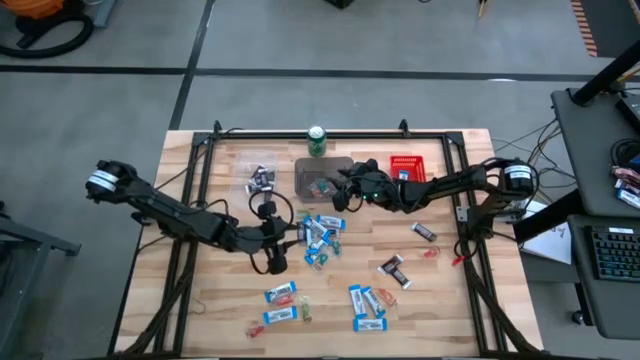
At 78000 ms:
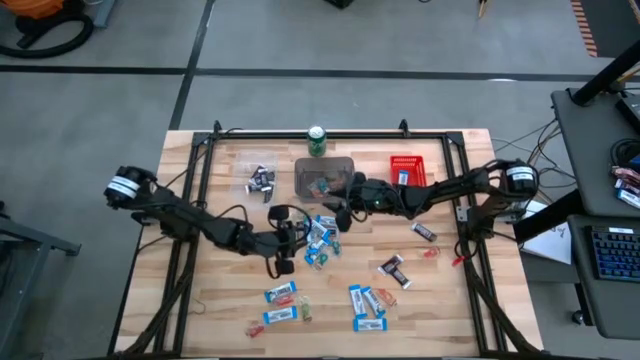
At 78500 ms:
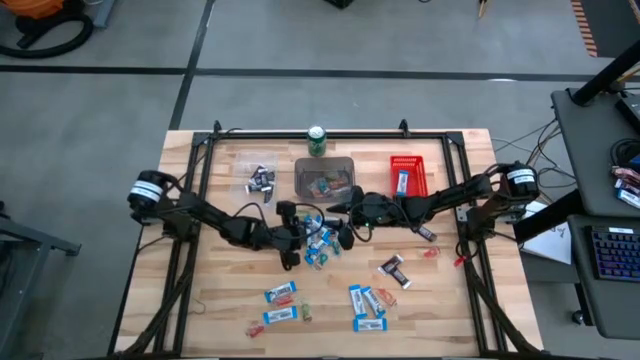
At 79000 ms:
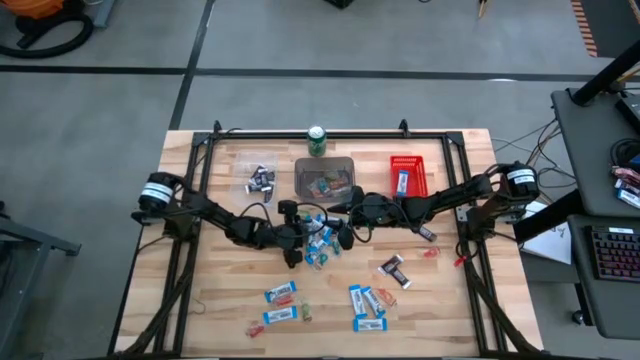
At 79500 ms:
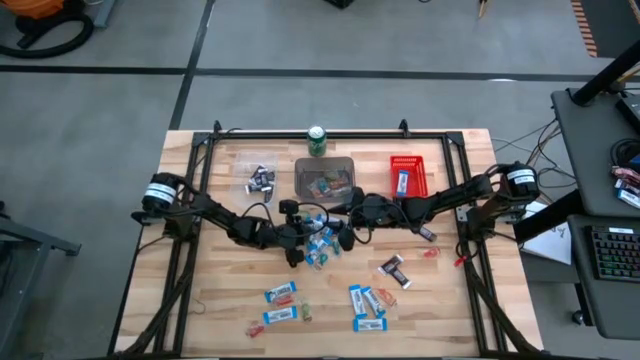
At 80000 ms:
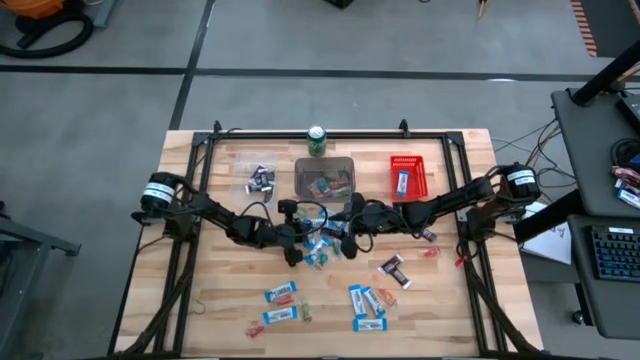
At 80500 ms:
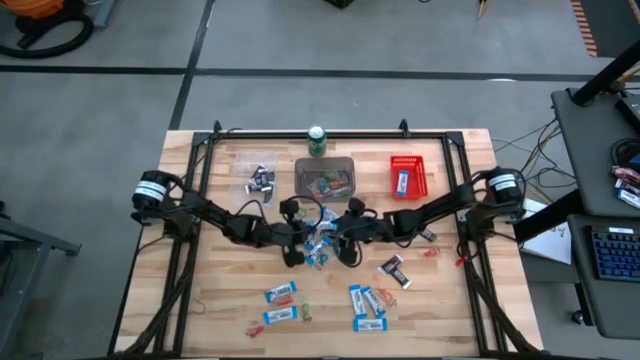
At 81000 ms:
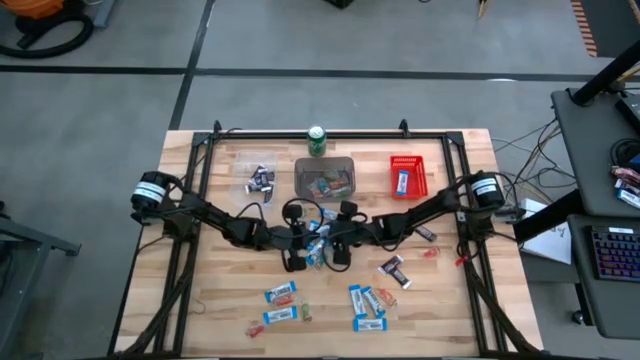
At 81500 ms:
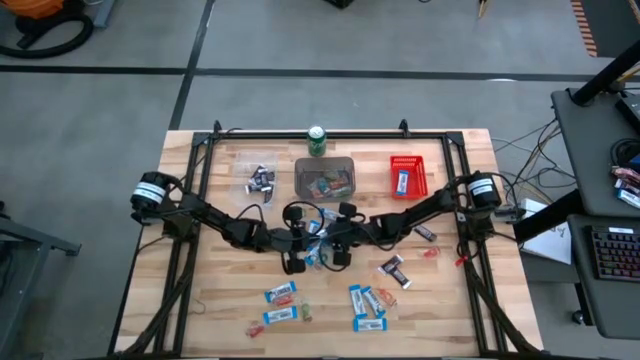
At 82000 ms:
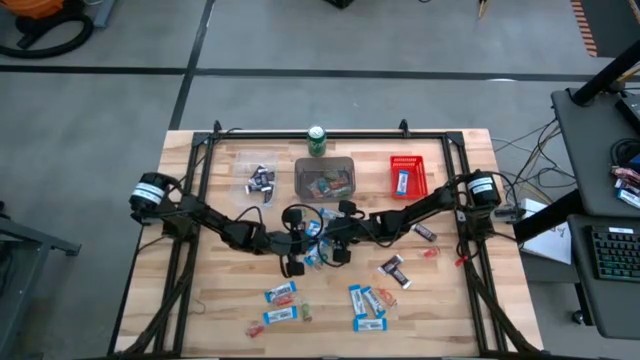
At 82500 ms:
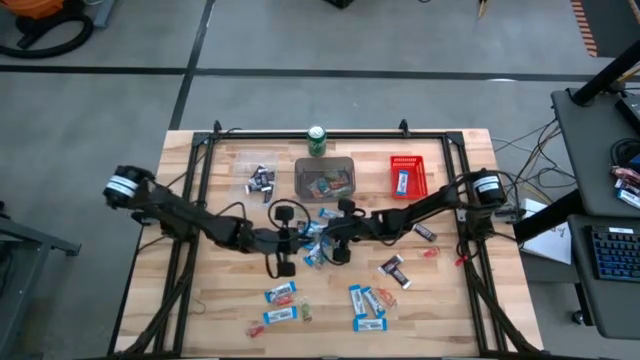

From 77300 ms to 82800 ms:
Task: Organize candy in baskets
Put the white chocolate bar into the red bin

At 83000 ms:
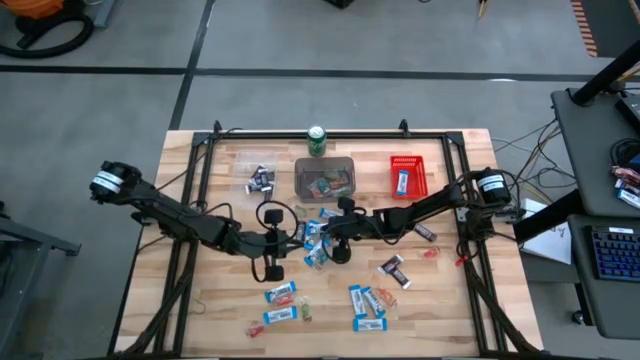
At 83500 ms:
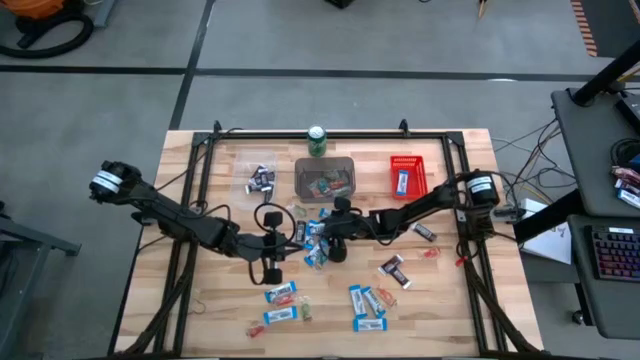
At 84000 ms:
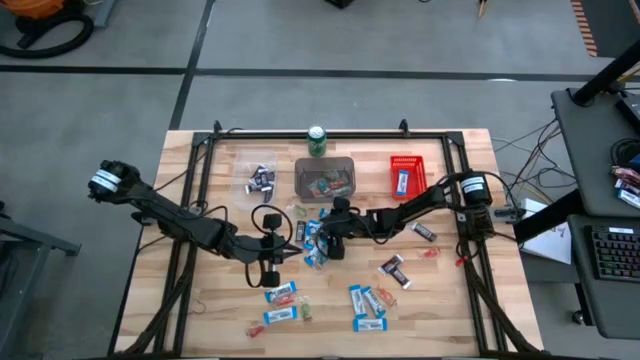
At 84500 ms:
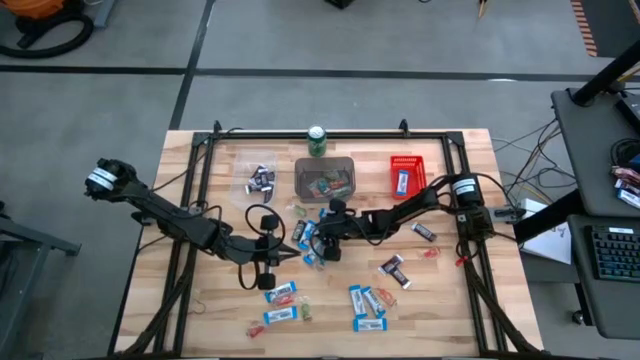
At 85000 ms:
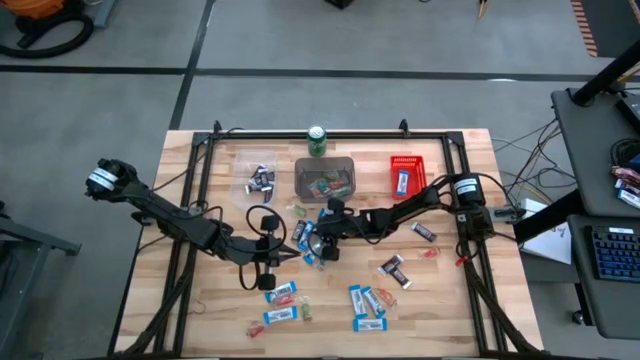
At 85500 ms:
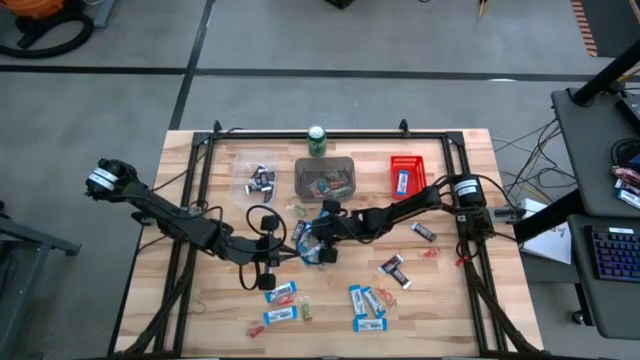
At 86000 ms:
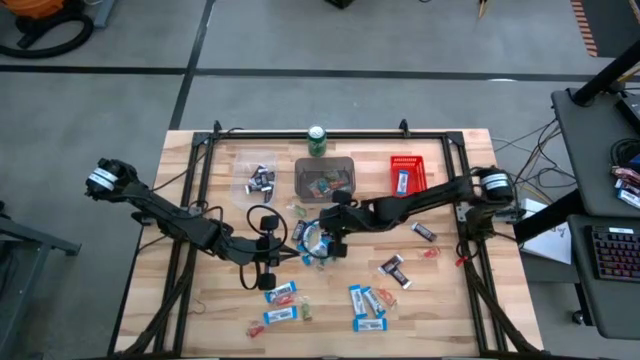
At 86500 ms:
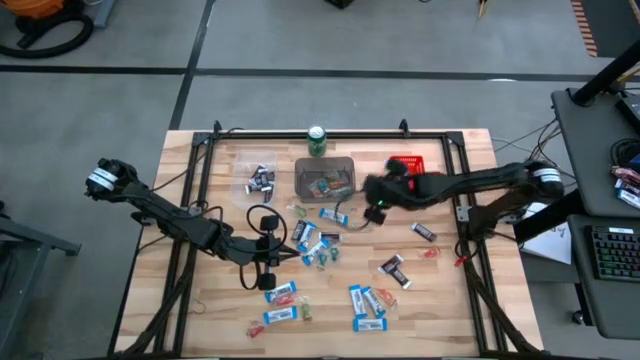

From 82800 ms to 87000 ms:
Put the white chocolate bar into the red bin

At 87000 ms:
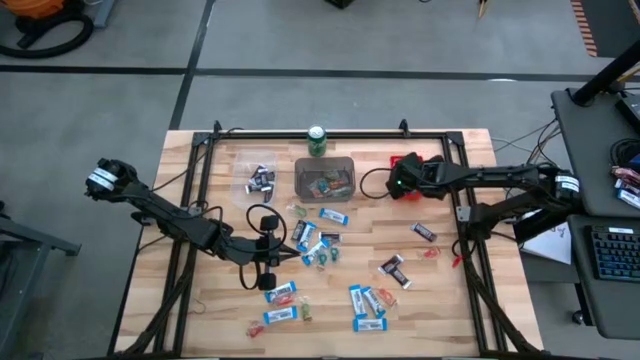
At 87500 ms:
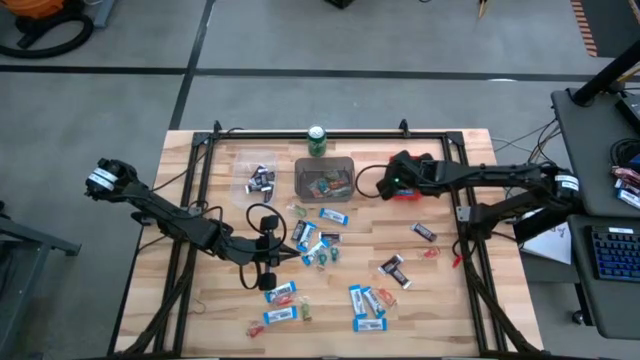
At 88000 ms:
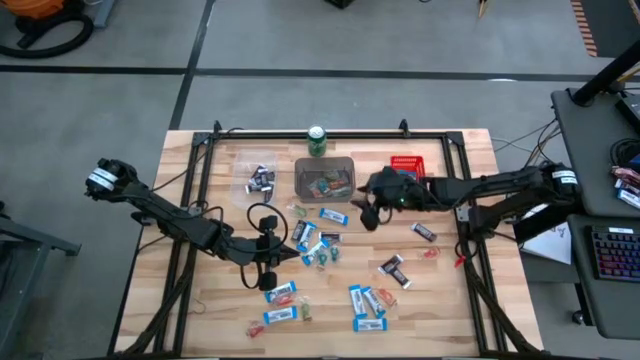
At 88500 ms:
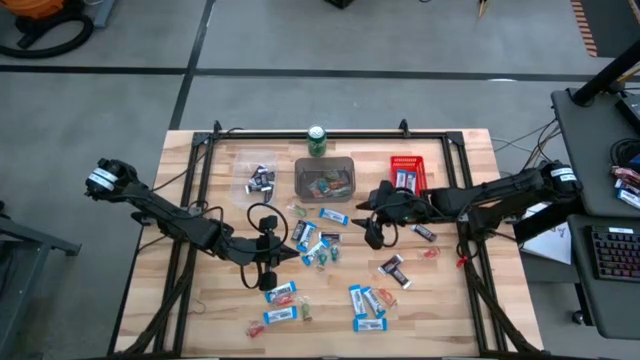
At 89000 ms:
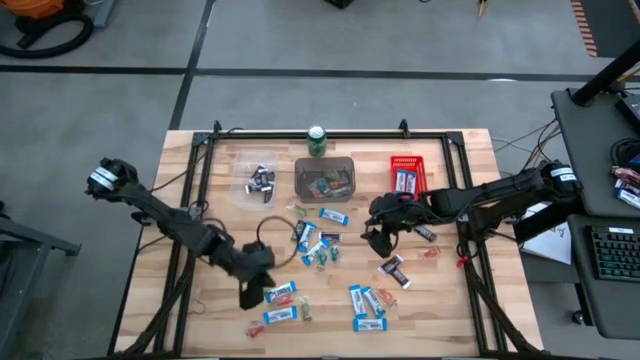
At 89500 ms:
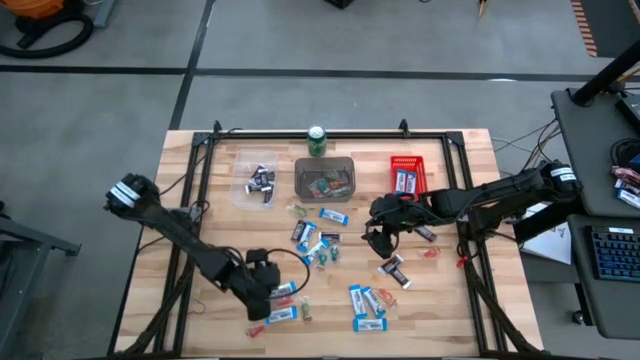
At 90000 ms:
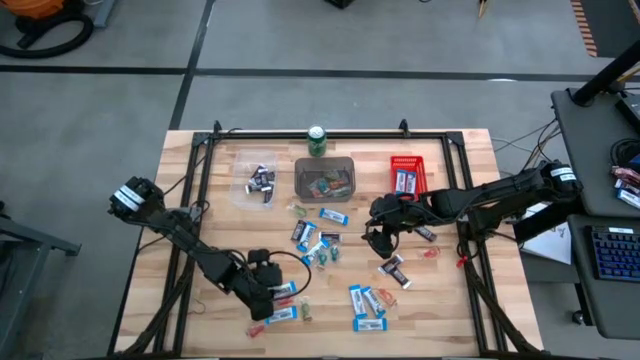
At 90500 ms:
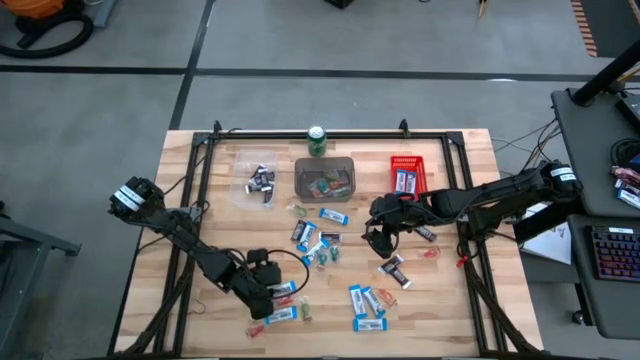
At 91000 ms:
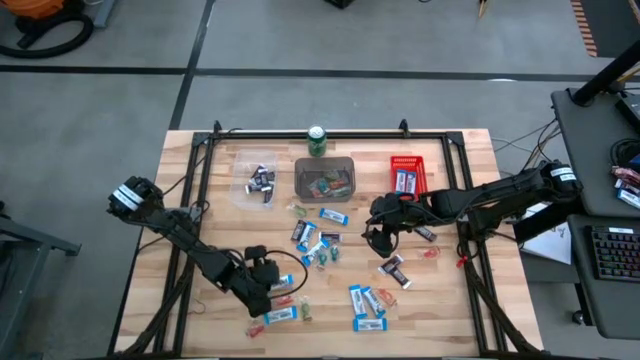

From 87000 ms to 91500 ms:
Put the white chocolate bar into the red bin

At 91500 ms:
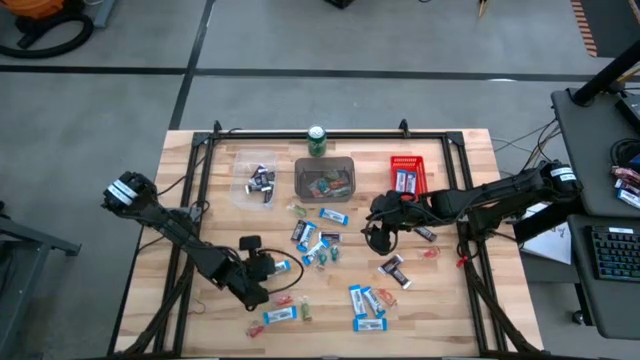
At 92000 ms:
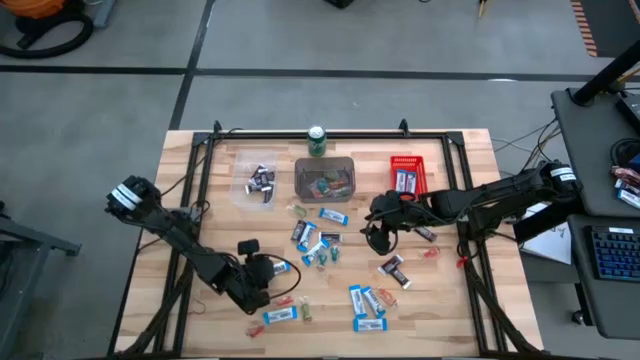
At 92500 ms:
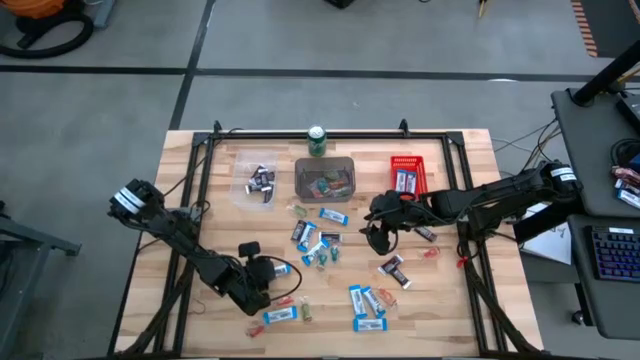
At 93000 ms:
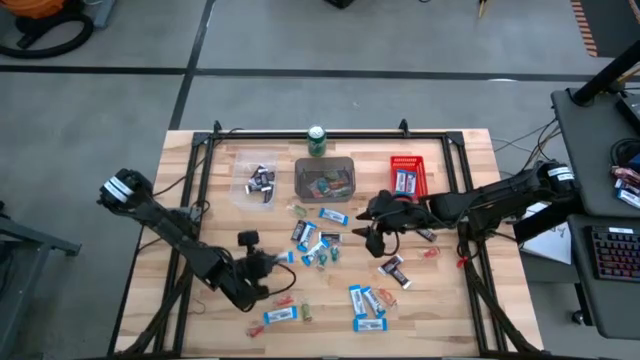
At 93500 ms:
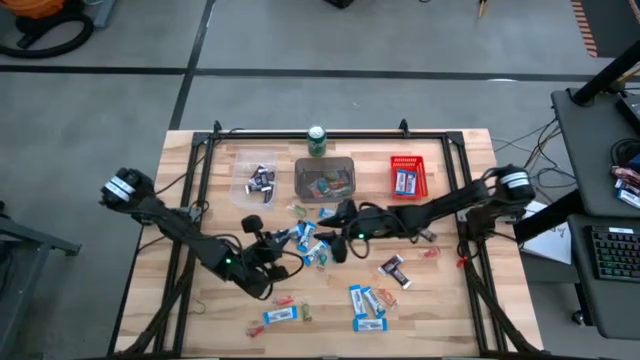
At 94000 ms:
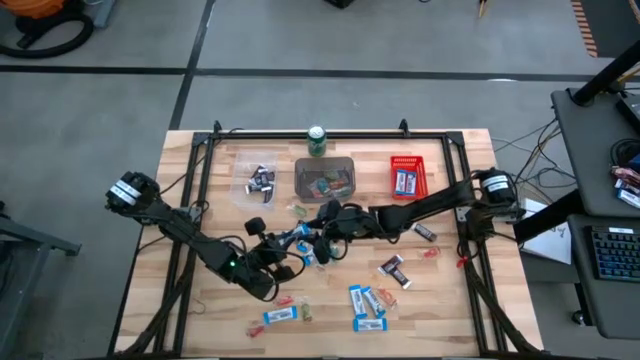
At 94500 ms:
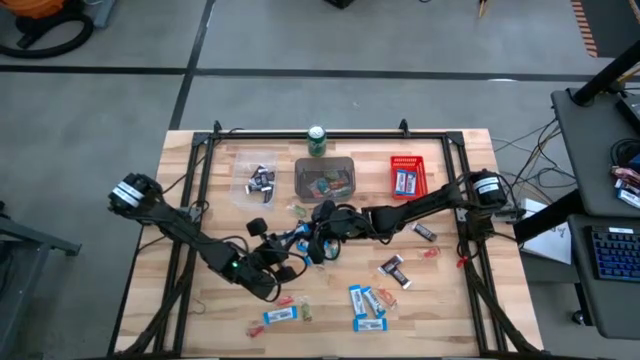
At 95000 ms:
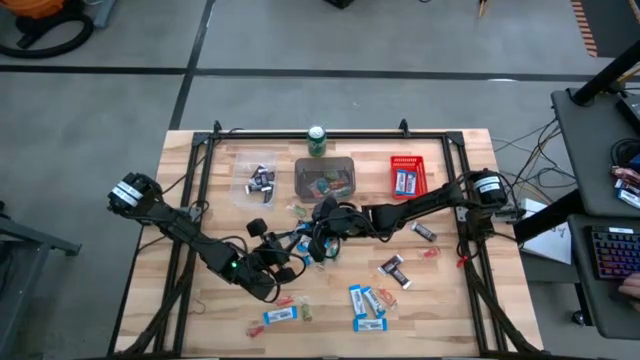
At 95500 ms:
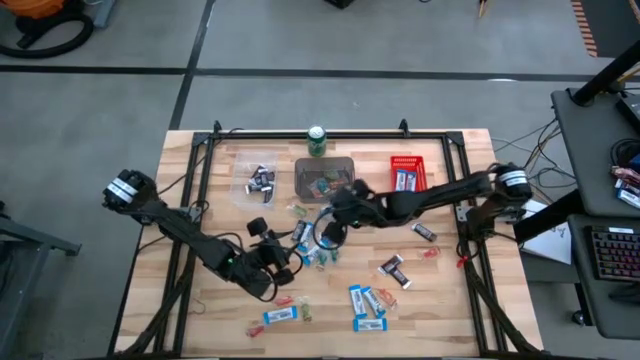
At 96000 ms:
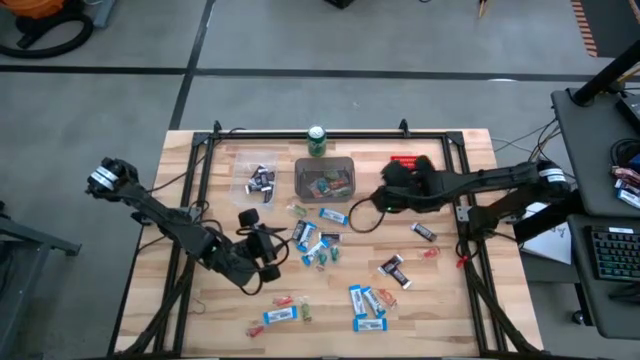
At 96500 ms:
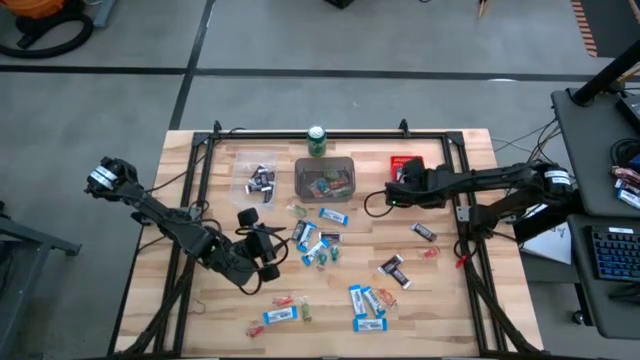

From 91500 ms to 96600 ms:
Put the white chocolate bar into the red bin

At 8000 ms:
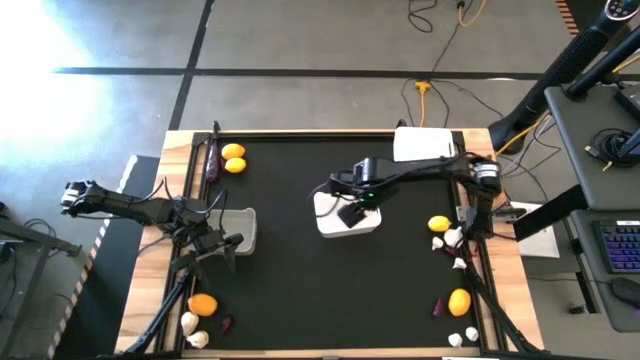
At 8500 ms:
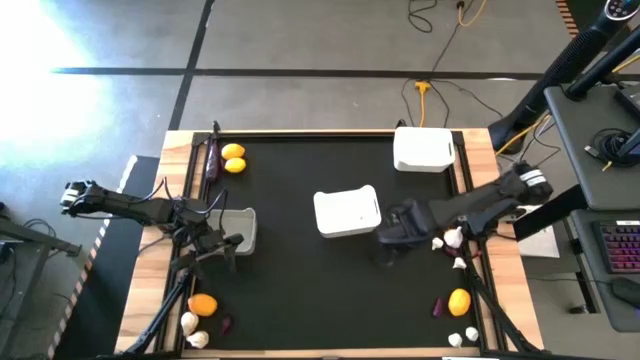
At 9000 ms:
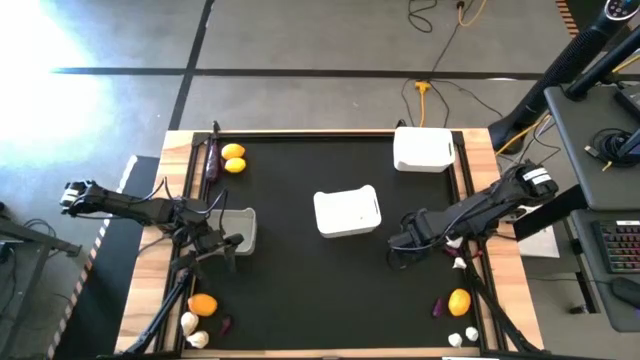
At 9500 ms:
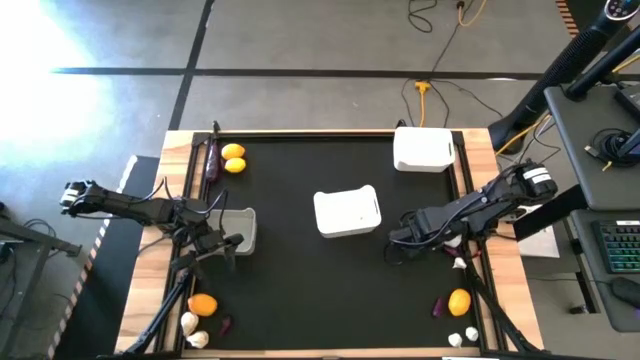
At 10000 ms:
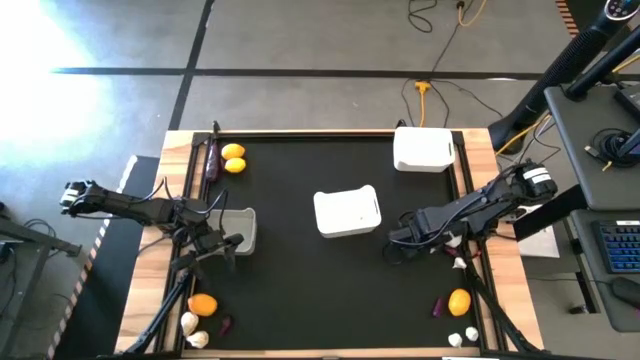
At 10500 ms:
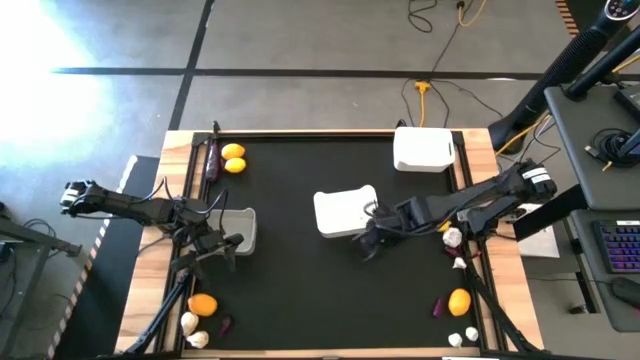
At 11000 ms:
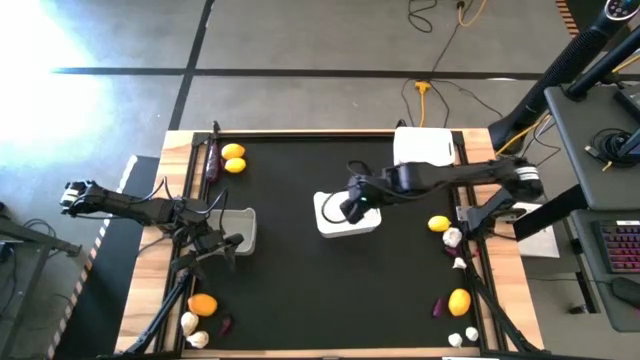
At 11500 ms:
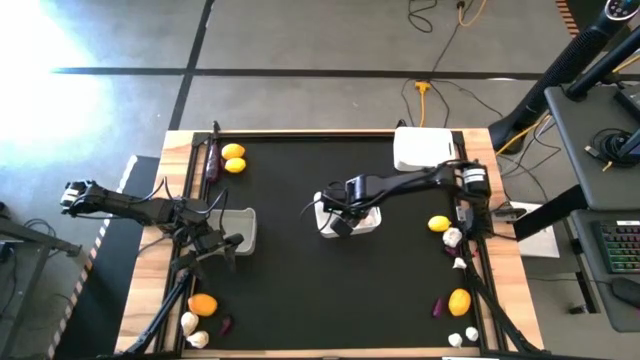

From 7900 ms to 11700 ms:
Task: Sort produce into baskets
Put the white garlic into the bottom white bin
